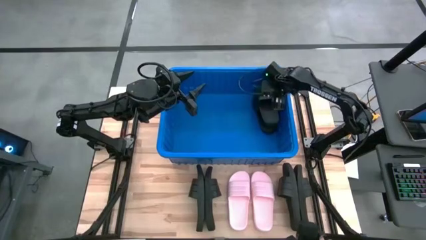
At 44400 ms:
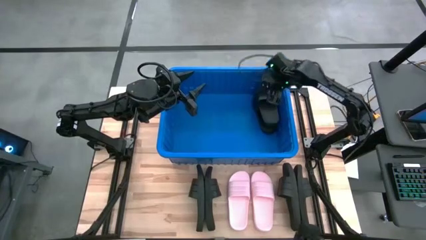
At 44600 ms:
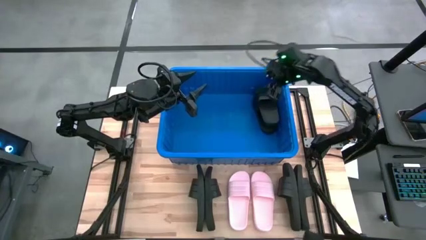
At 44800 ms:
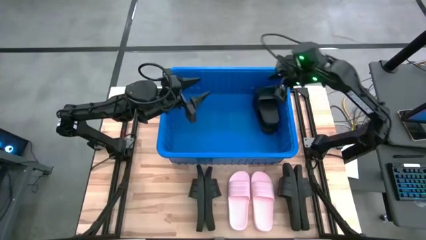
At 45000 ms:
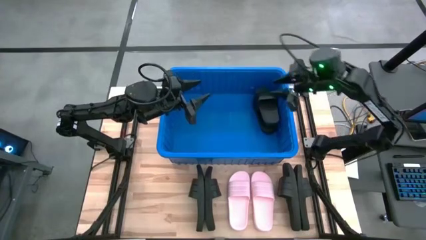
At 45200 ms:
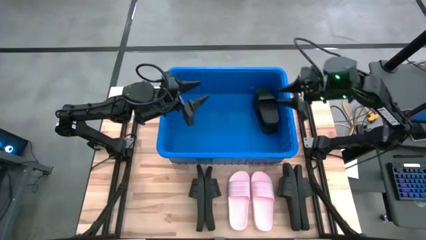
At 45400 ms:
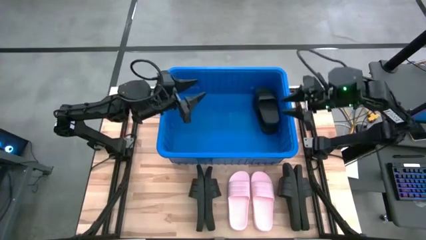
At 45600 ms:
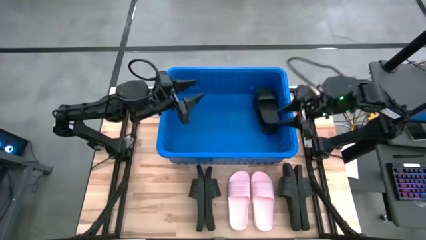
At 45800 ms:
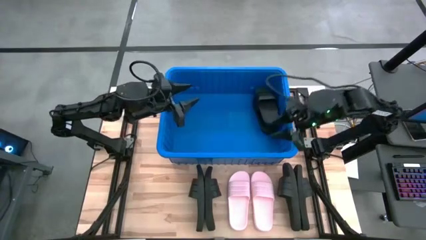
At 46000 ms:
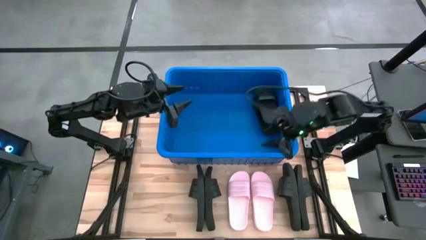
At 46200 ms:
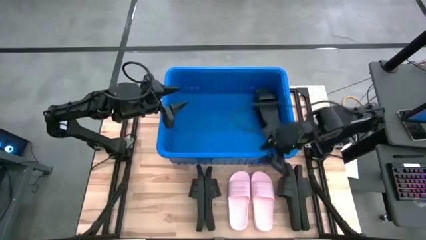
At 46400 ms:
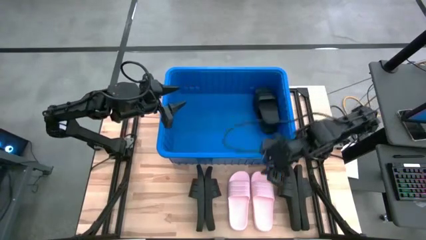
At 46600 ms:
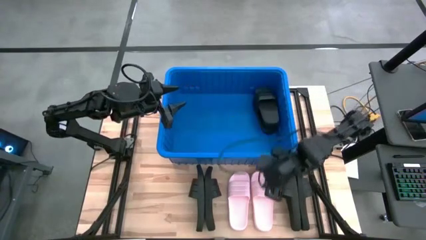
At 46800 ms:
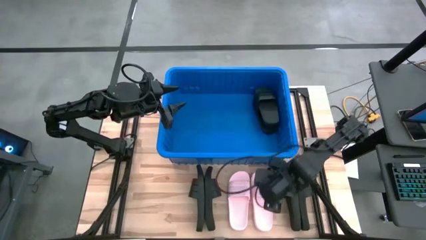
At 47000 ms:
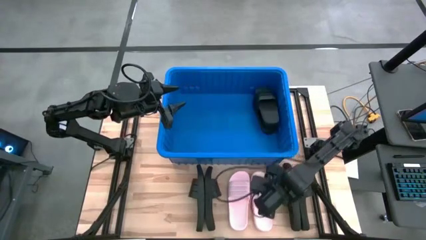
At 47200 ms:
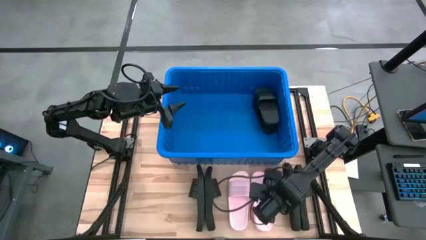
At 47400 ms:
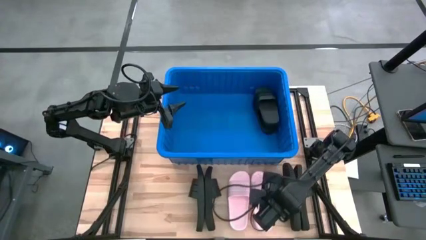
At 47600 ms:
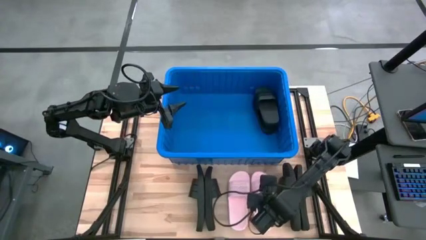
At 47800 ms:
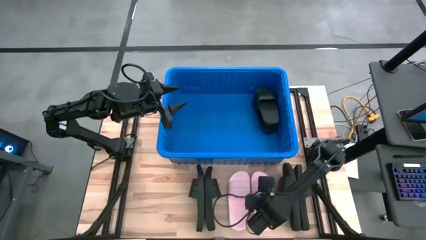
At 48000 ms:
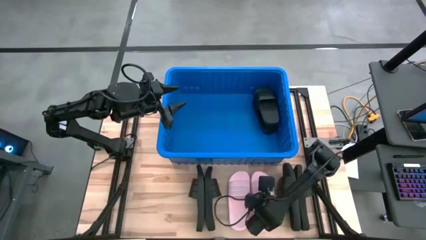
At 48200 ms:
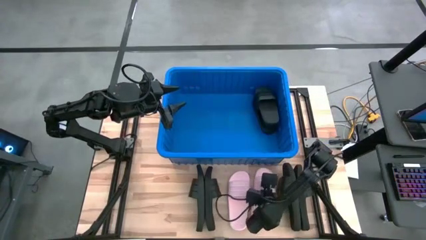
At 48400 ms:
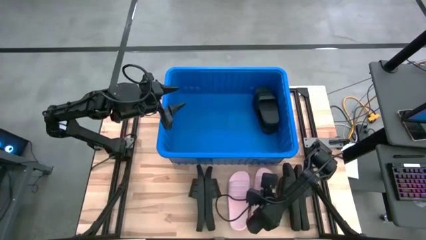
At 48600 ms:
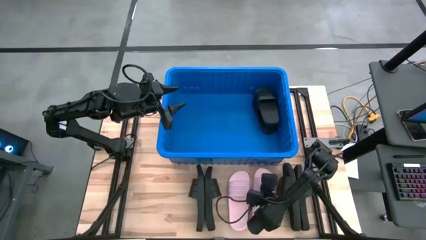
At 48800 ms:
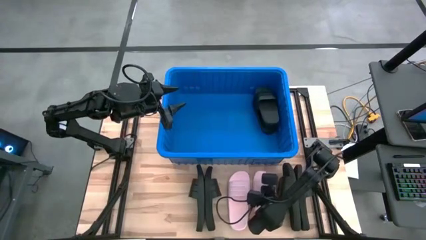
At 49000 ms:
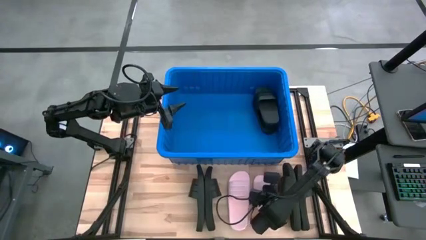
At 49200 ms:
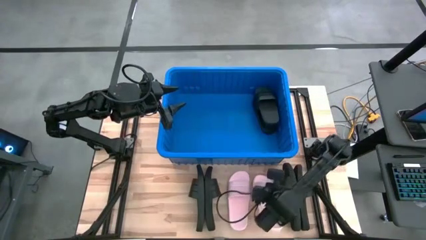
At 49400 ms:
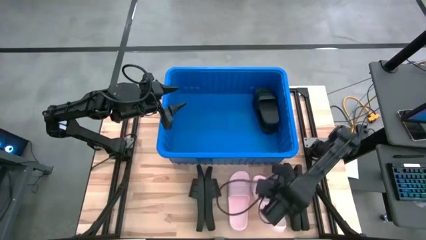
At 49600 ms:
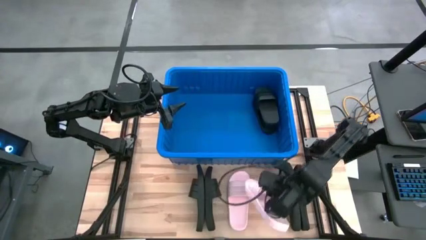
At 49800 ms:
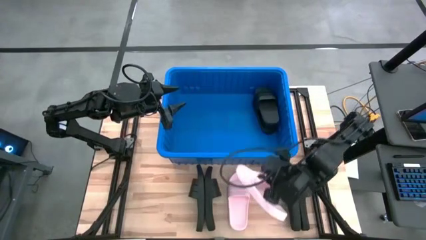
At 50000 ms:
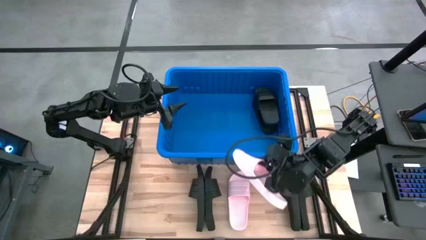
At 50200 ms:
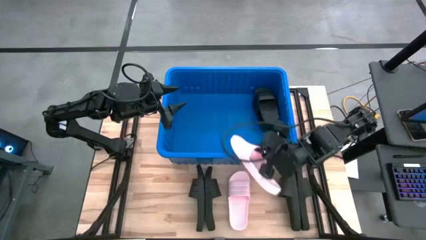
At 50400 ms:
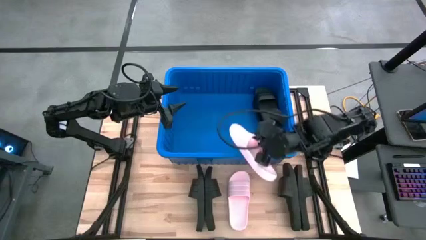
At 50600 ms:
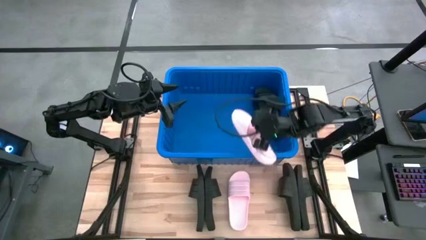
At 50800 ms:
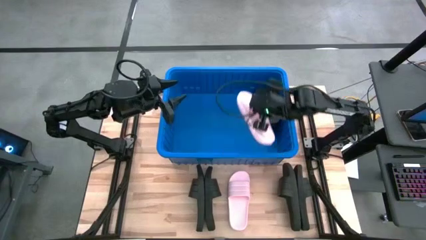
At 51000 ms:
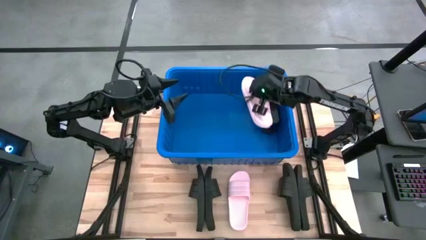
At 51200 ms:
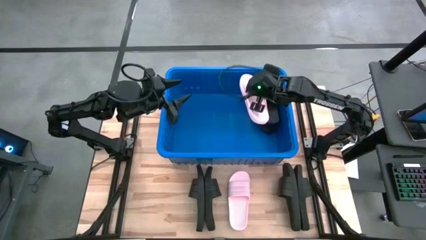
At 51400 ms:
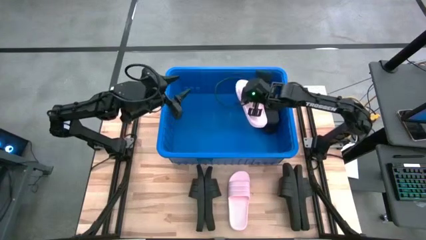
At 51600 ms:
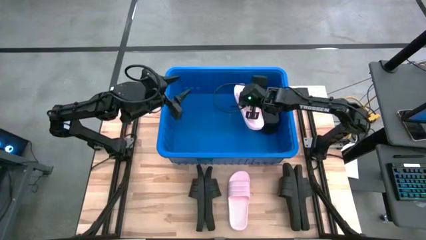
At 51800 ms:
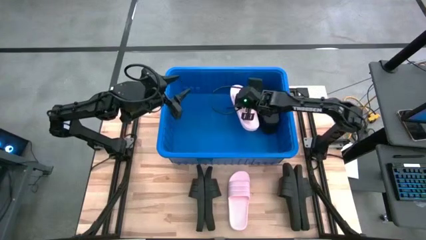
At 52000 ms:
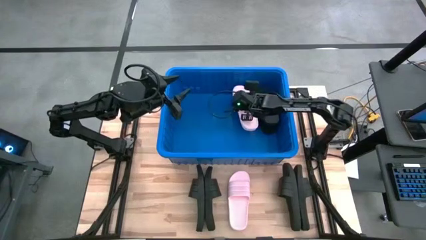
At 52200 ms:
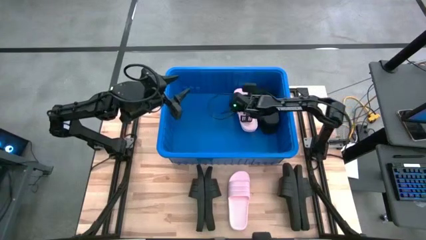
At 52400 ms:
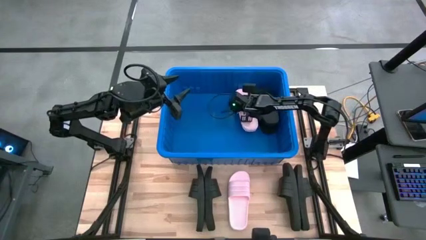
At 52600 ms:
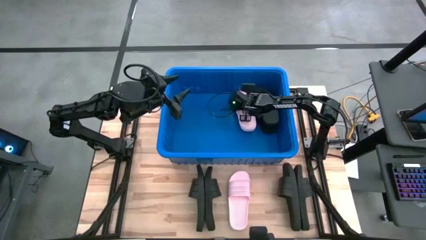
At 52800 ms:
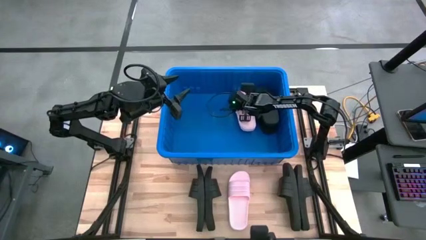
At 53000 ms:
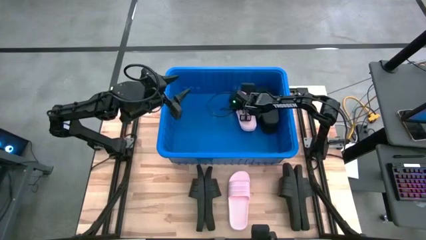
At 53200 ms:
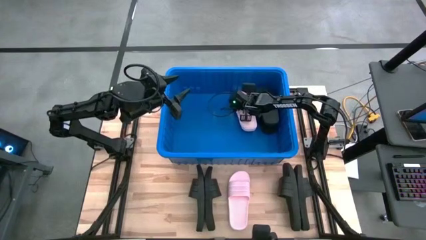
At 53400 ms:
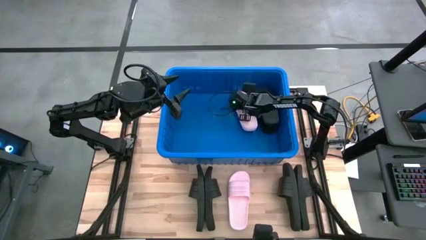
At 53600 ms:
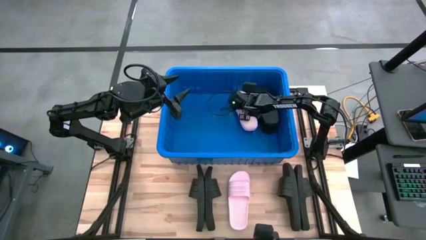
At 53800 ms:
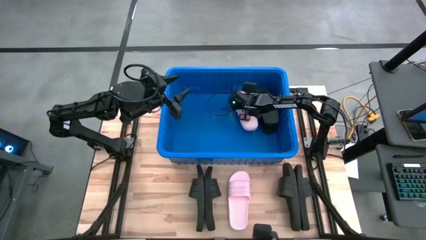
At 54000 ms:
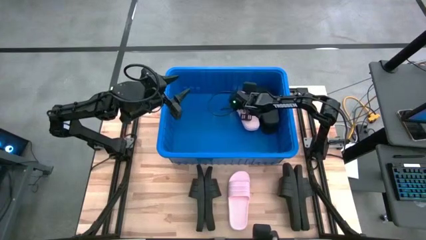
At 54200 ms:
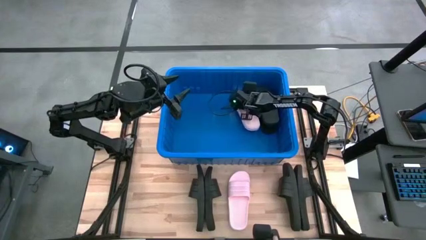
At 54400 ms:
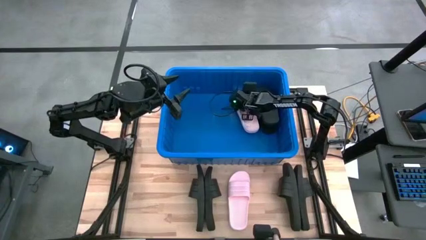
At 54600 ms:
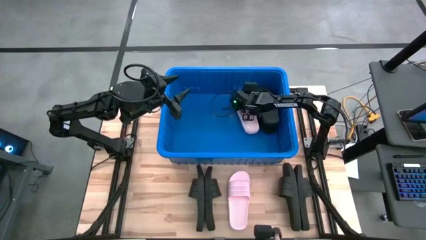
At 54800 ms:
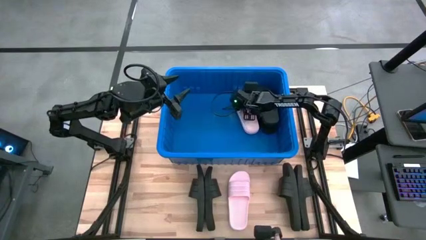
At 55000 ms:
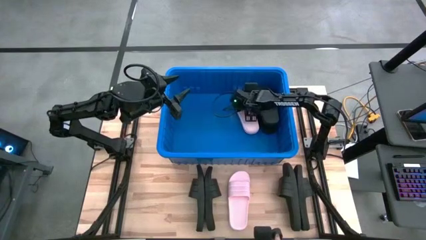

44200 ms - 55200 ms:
Task: Pick and place slides into bin
Put the pink slide into the blue bin
